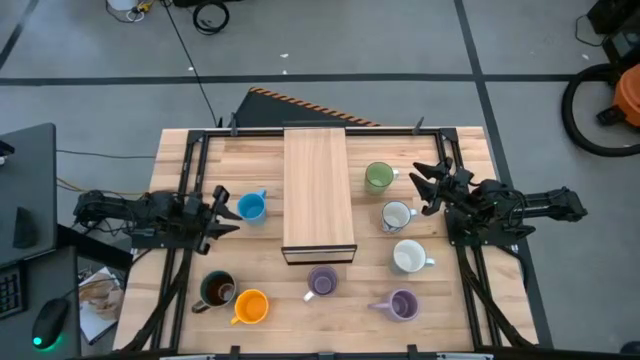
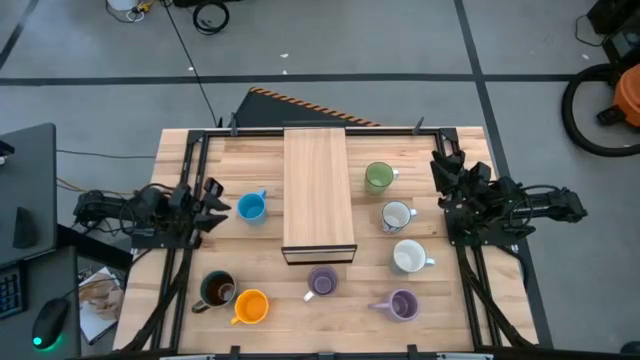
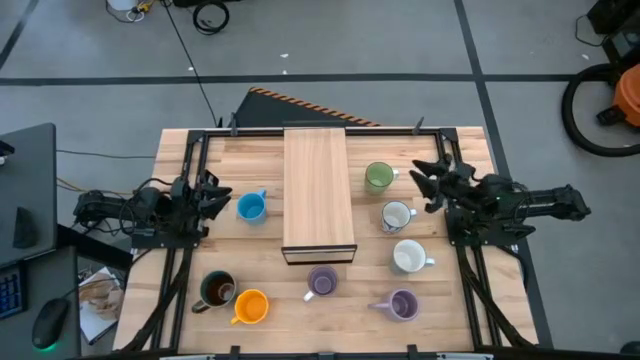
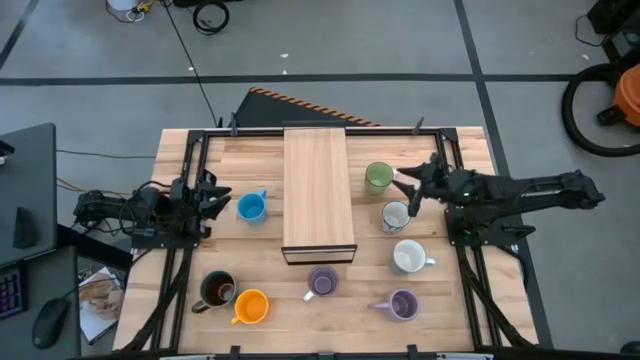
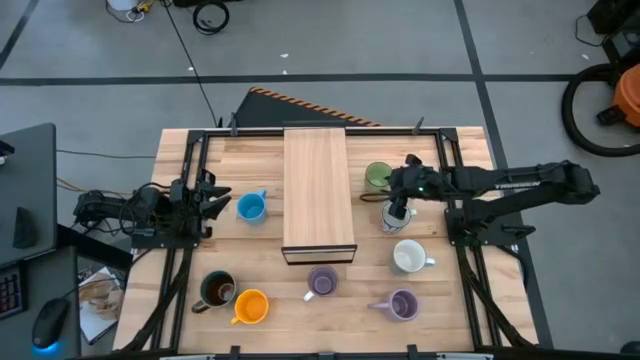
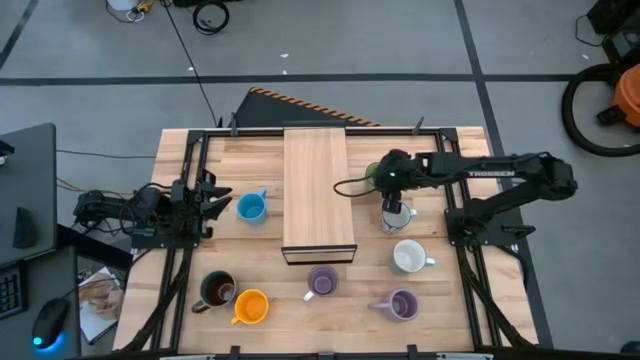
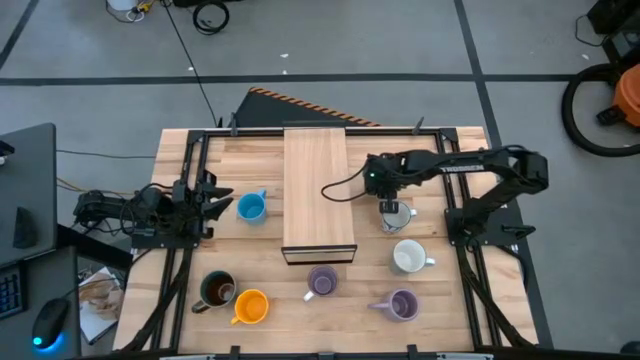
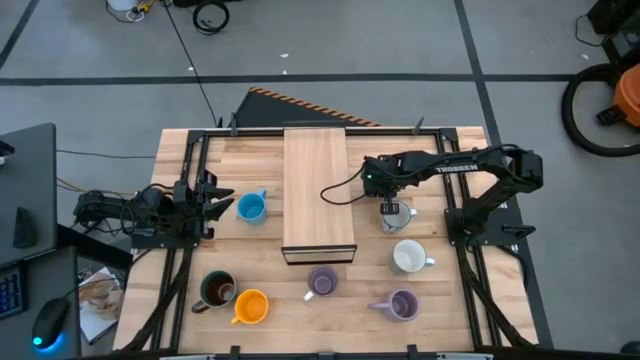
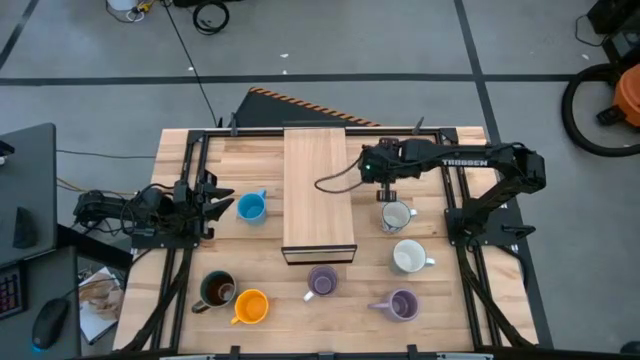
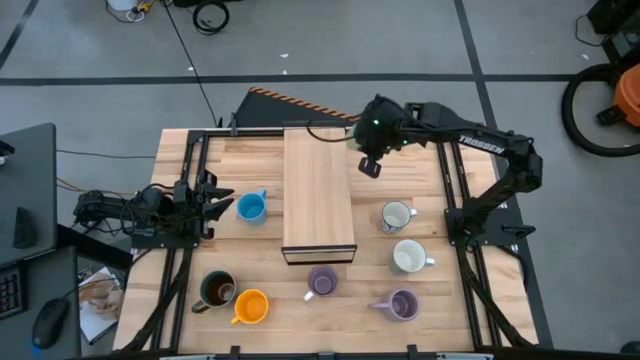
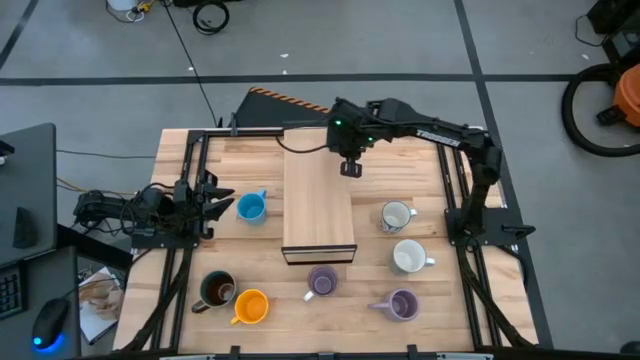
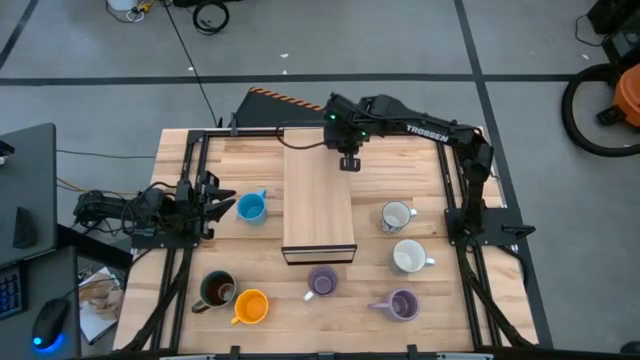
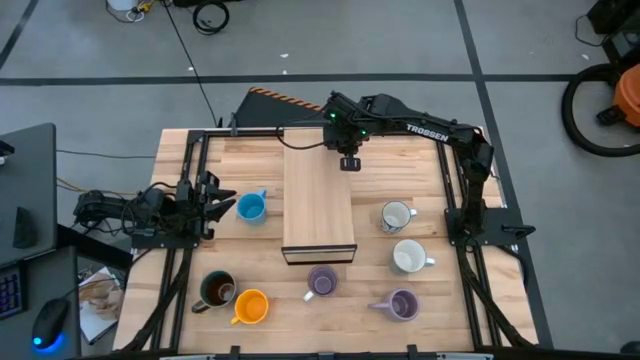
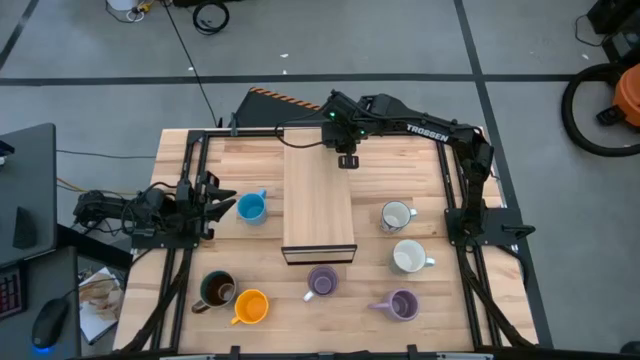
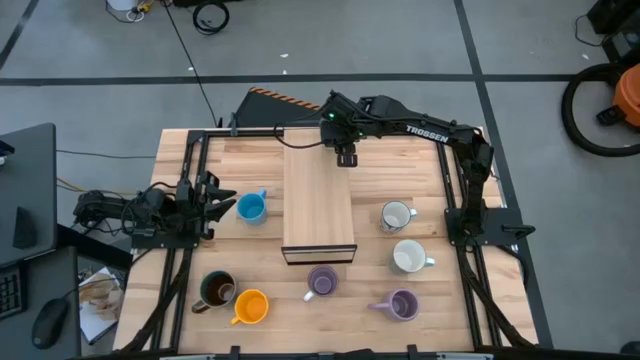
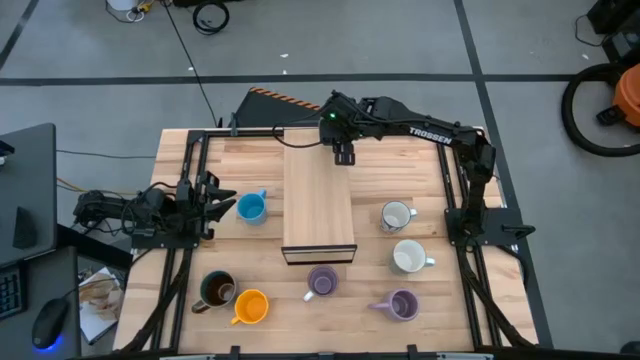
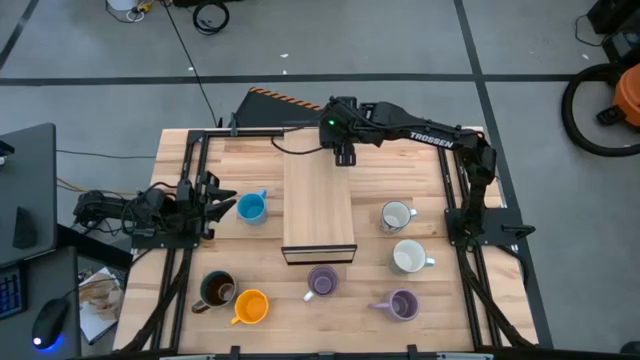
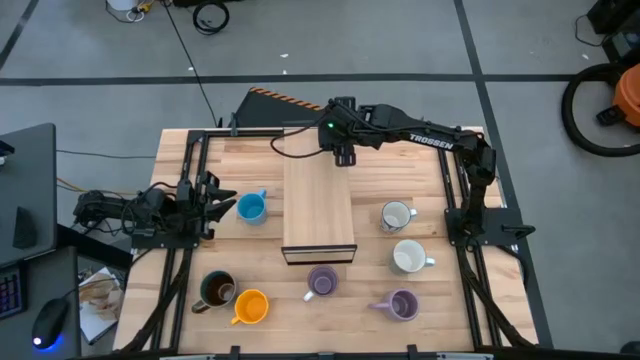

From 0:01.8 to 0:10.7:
Task: Place coffee mugs
Put the green mug on the shelf

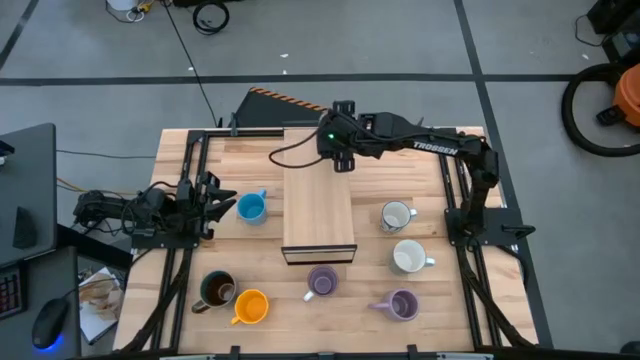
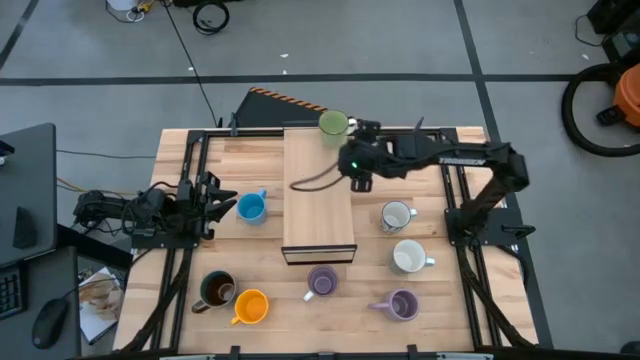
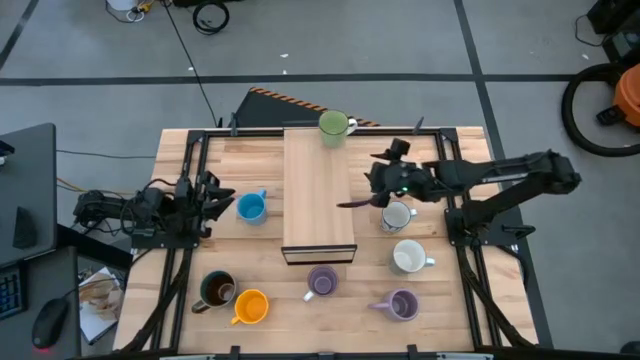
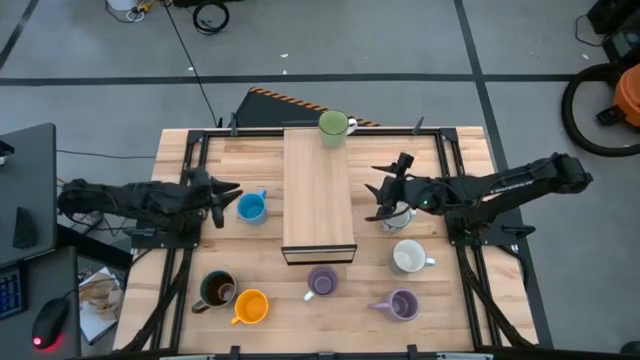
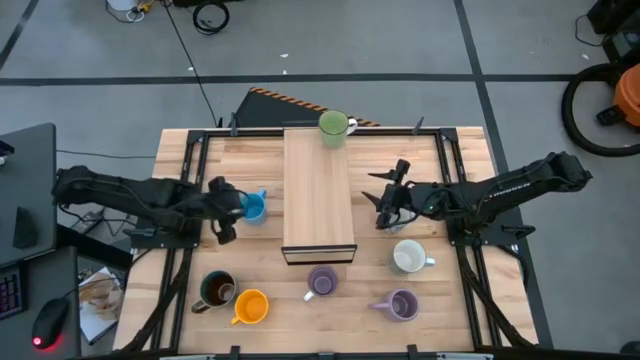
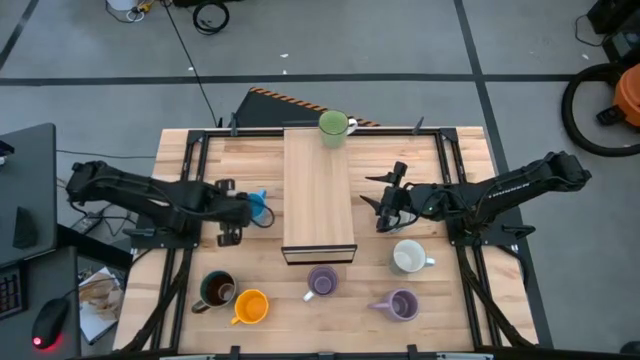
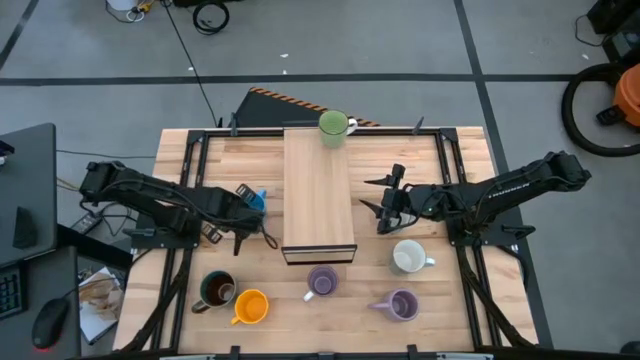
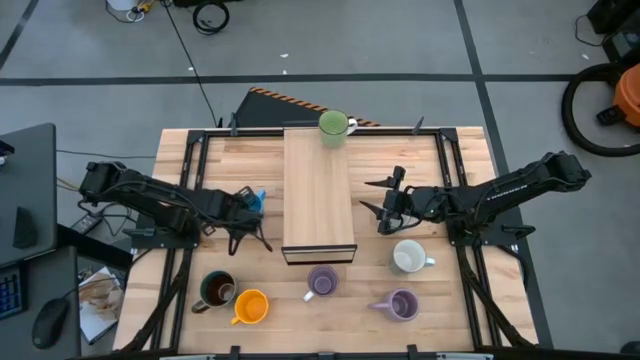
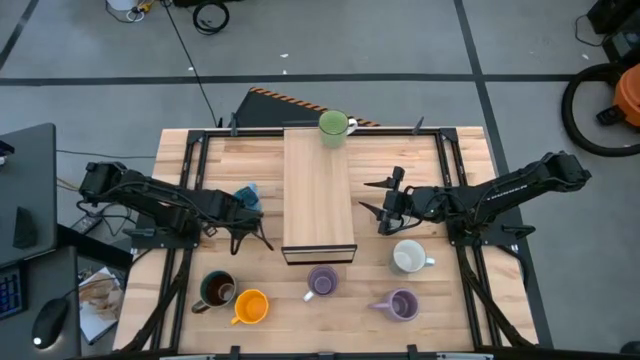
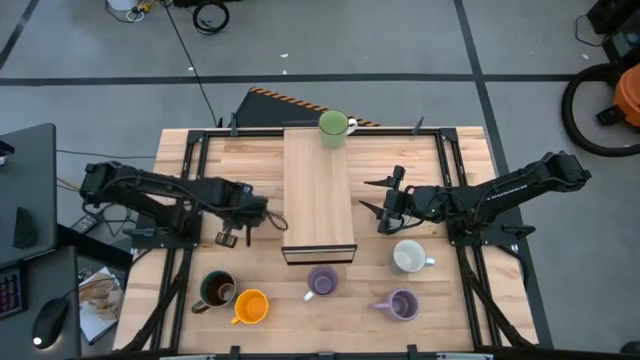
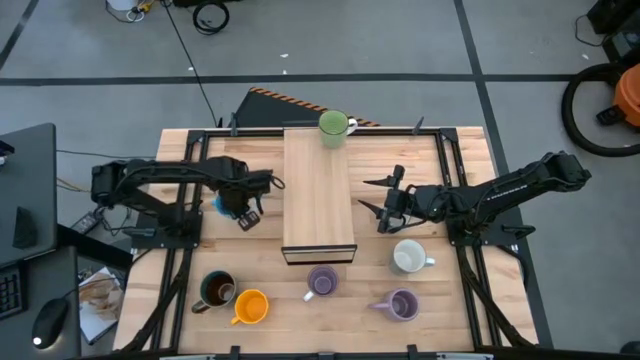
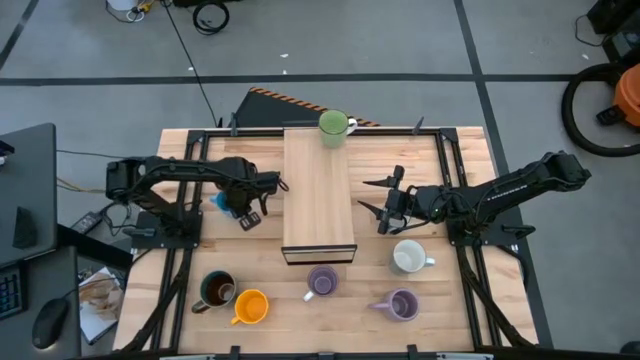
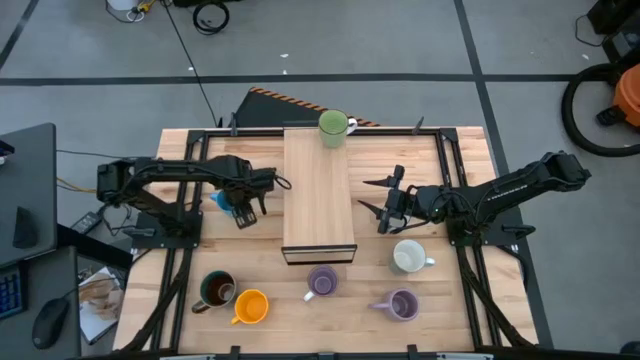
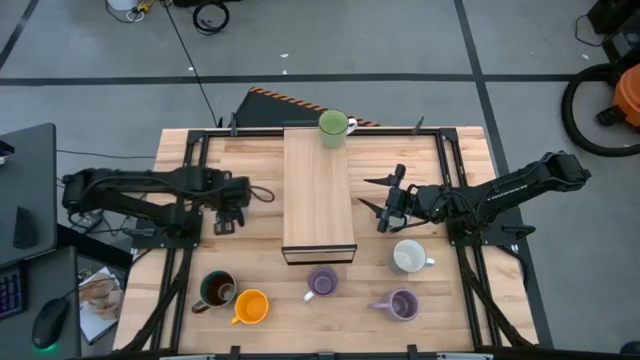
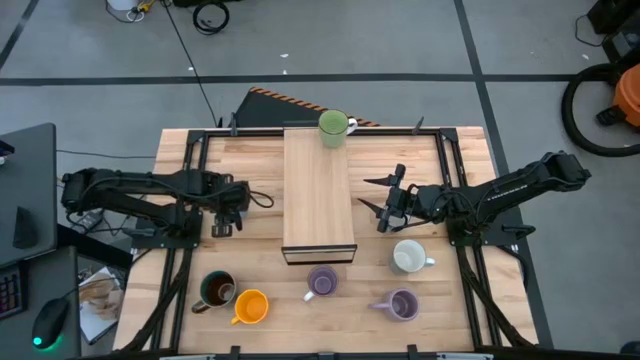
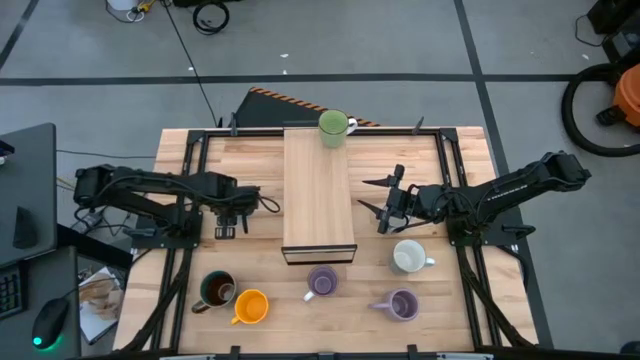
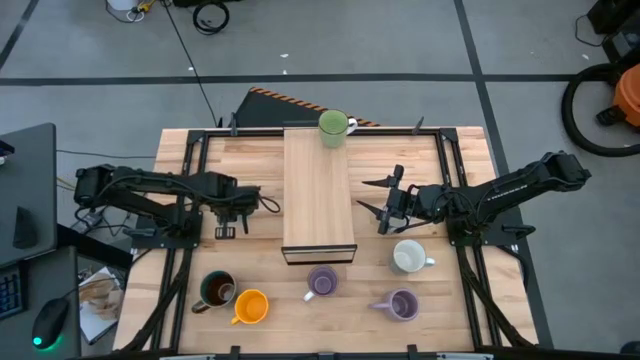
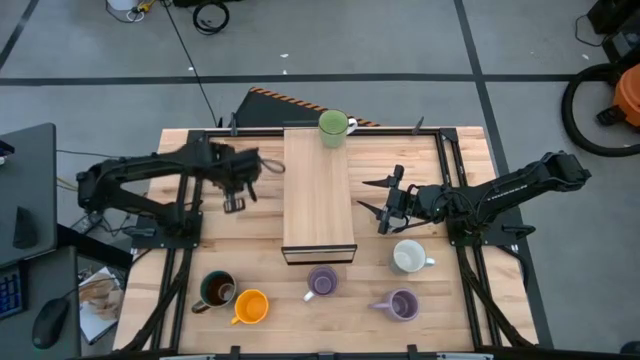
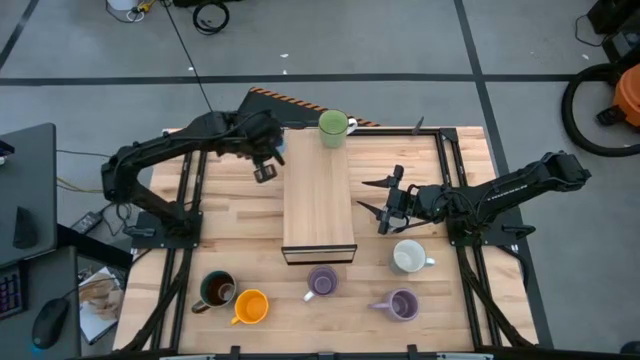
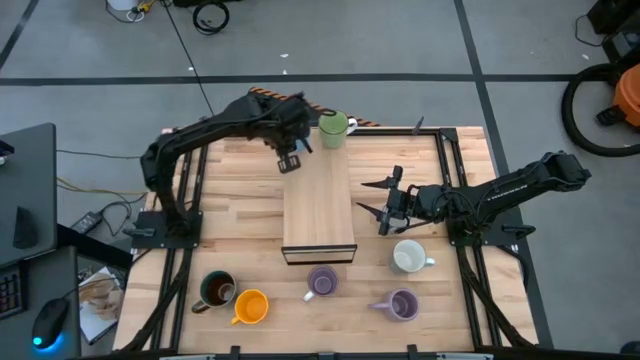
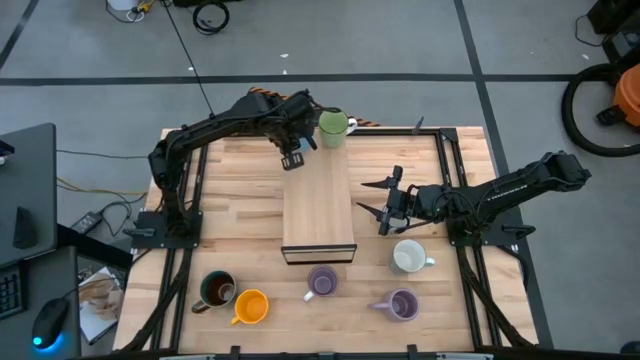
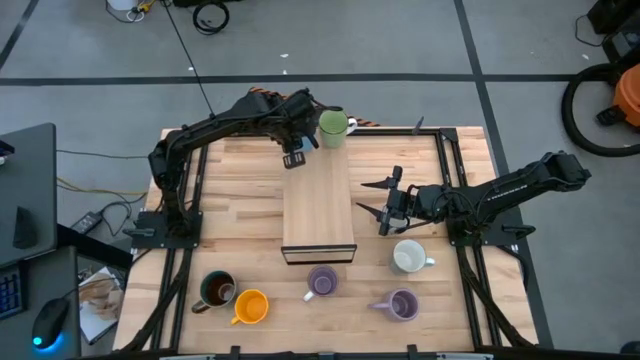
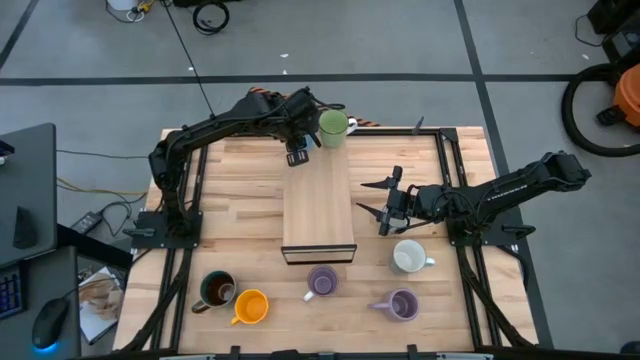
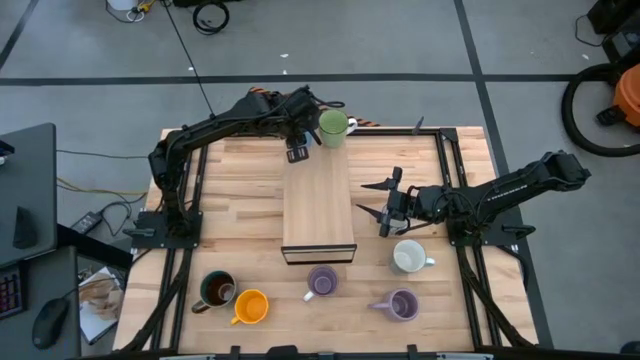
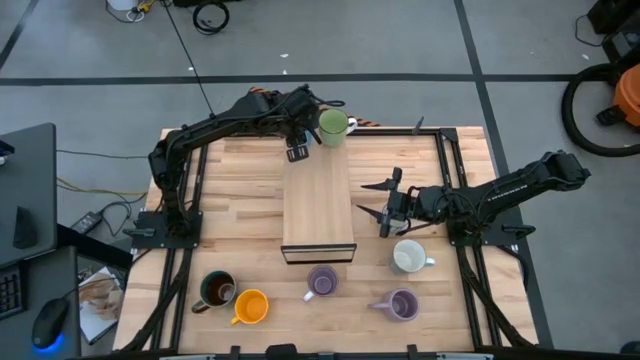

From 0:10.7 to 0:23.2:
Put the blue mug on the shelf
